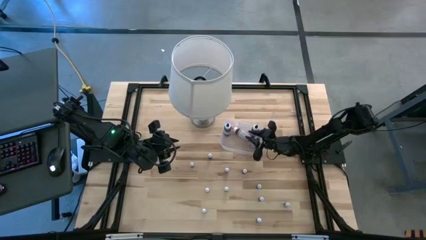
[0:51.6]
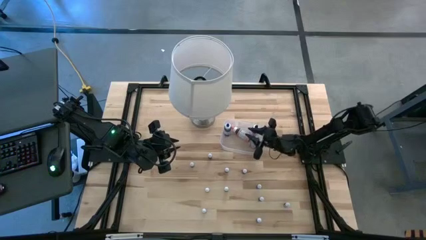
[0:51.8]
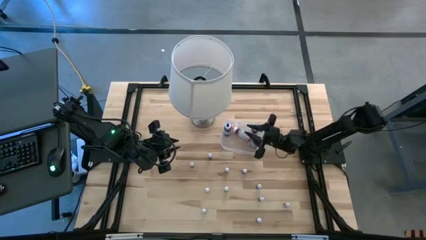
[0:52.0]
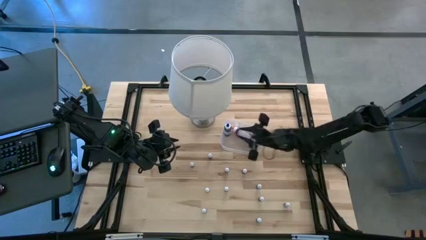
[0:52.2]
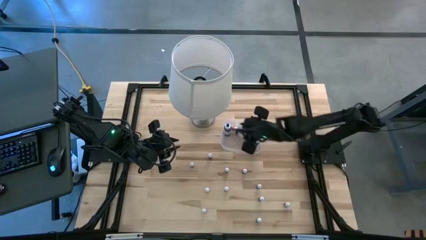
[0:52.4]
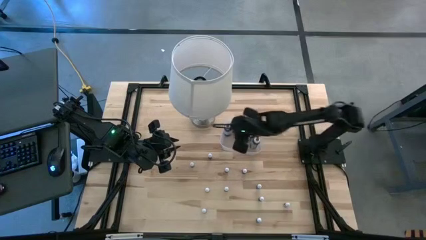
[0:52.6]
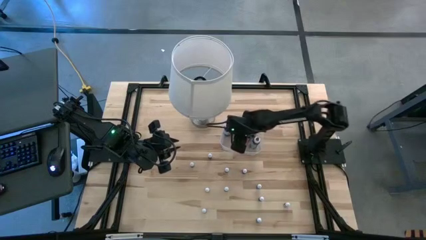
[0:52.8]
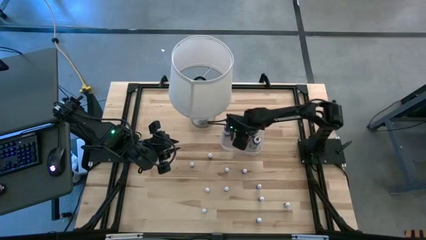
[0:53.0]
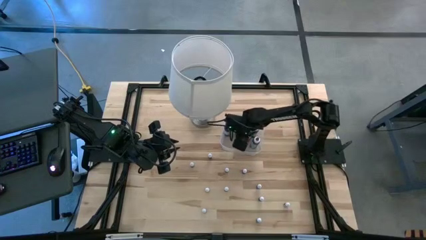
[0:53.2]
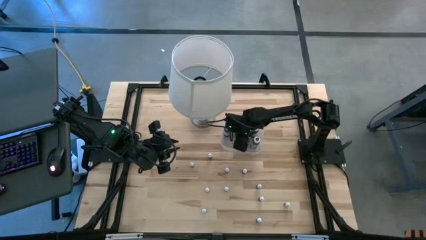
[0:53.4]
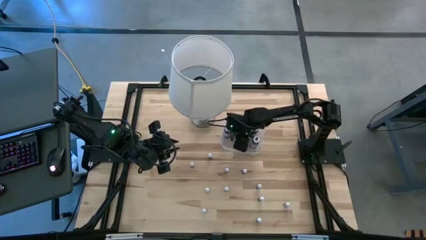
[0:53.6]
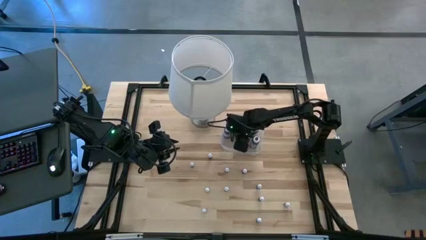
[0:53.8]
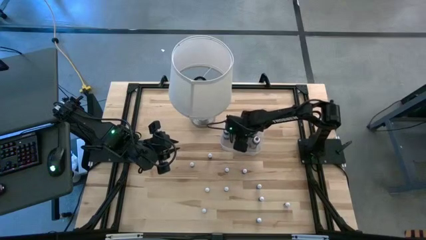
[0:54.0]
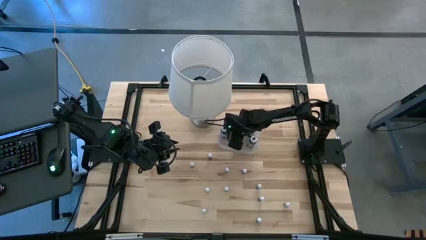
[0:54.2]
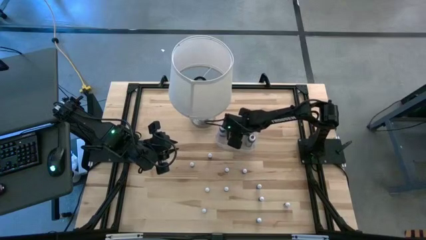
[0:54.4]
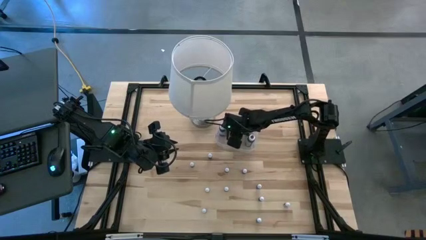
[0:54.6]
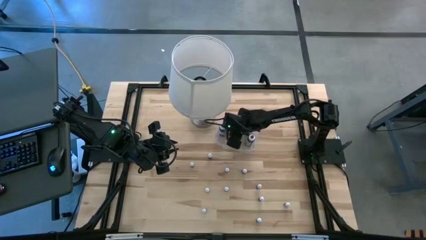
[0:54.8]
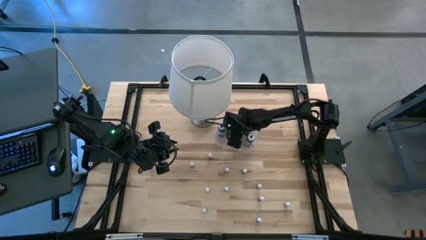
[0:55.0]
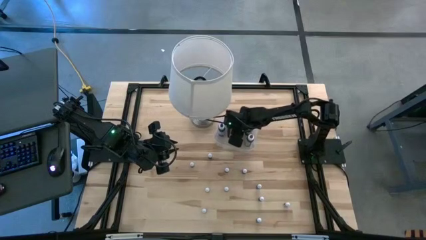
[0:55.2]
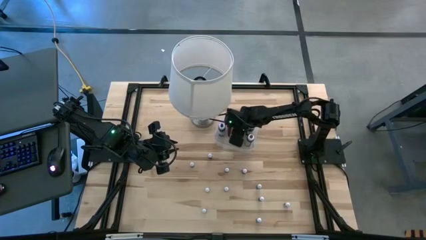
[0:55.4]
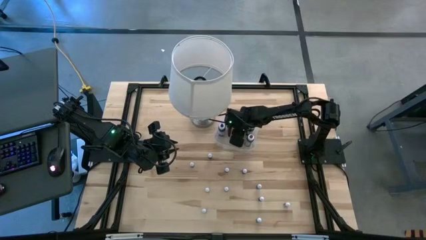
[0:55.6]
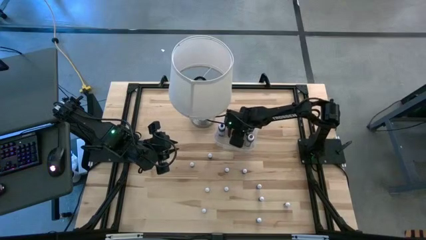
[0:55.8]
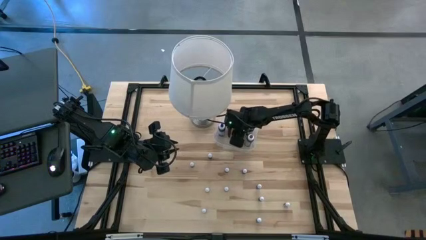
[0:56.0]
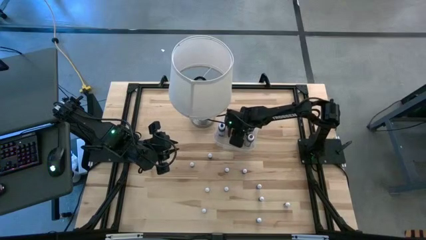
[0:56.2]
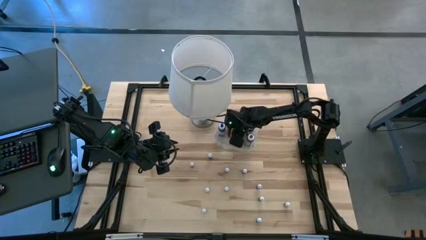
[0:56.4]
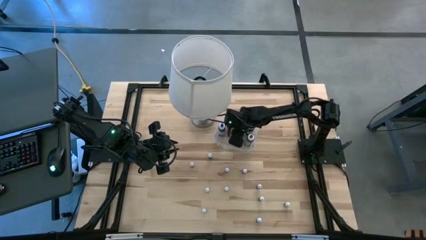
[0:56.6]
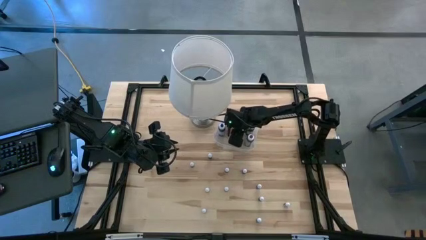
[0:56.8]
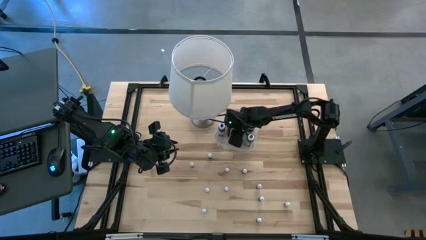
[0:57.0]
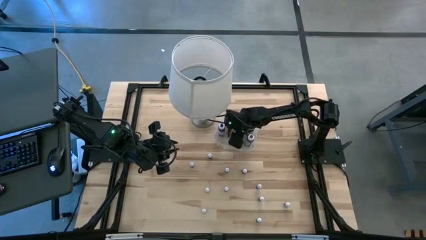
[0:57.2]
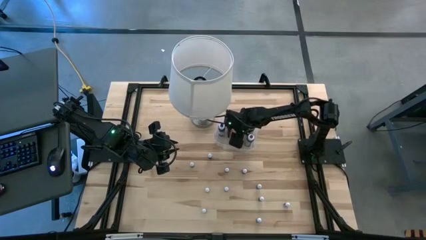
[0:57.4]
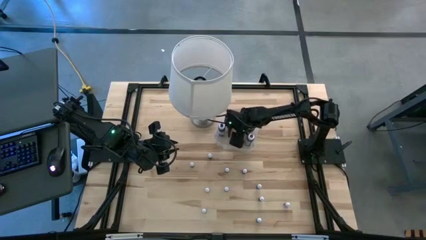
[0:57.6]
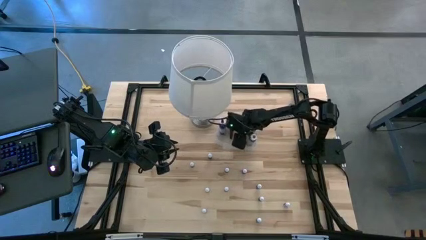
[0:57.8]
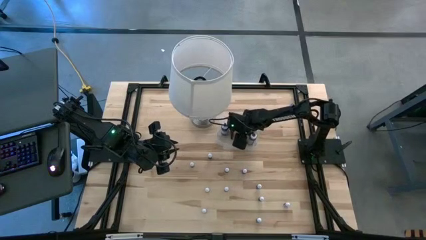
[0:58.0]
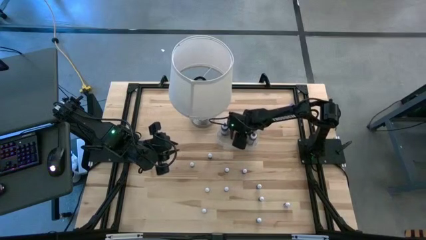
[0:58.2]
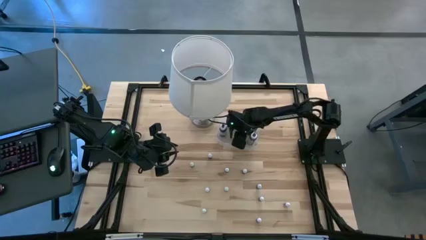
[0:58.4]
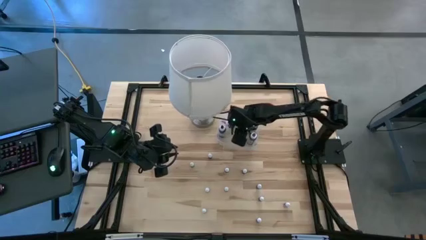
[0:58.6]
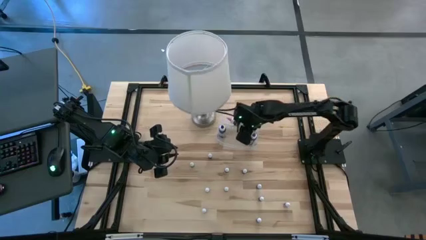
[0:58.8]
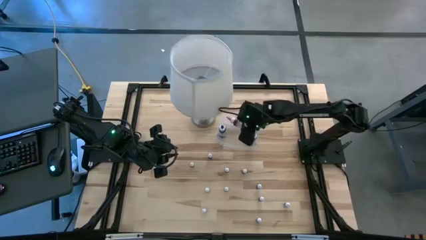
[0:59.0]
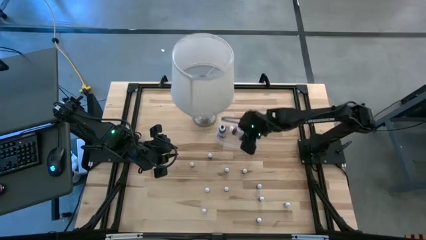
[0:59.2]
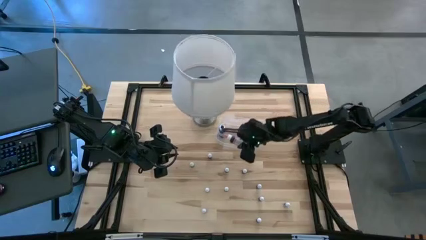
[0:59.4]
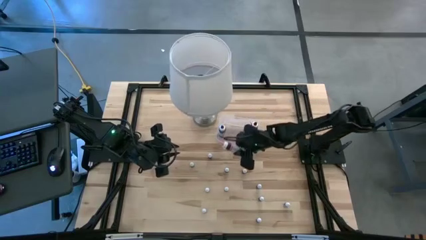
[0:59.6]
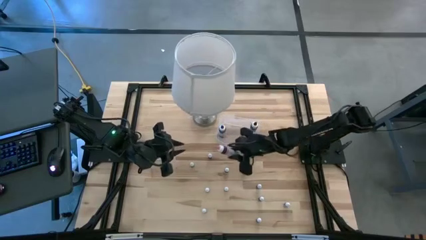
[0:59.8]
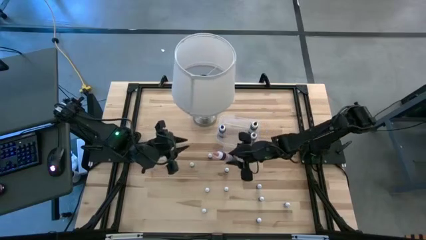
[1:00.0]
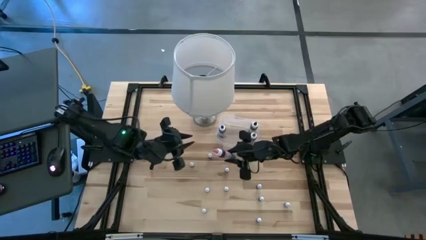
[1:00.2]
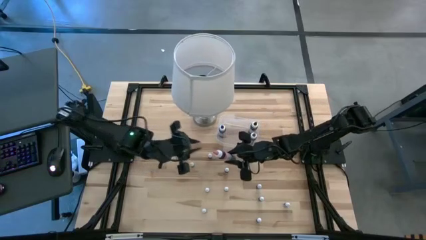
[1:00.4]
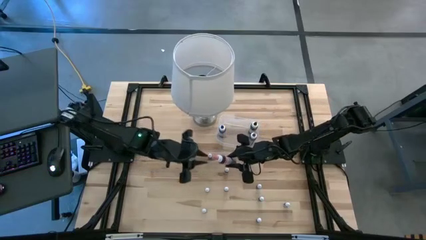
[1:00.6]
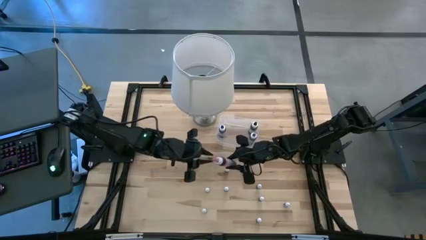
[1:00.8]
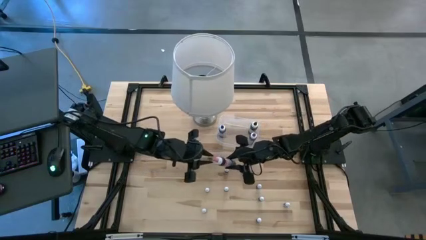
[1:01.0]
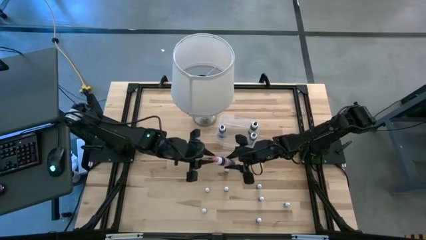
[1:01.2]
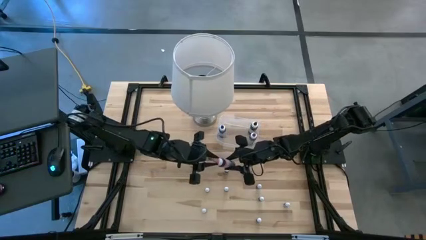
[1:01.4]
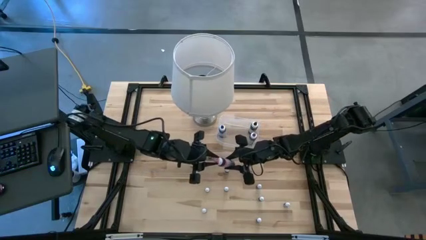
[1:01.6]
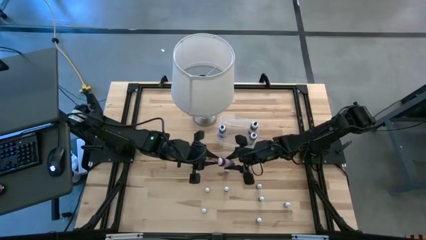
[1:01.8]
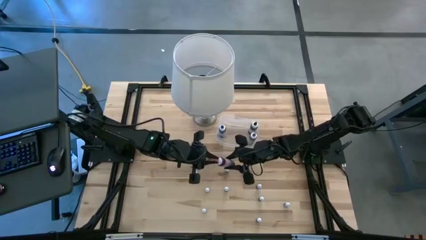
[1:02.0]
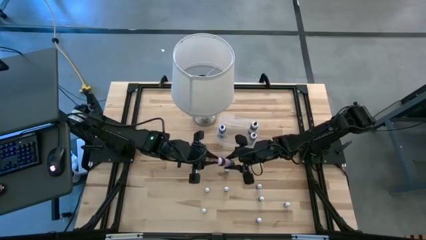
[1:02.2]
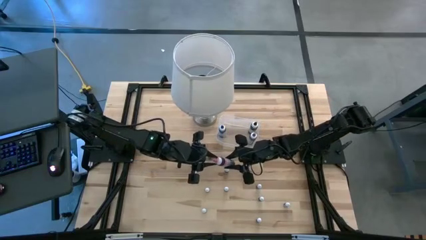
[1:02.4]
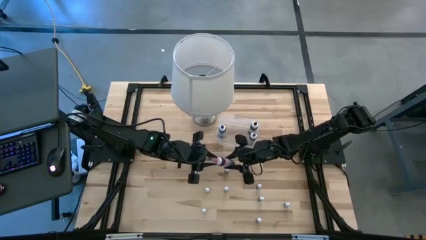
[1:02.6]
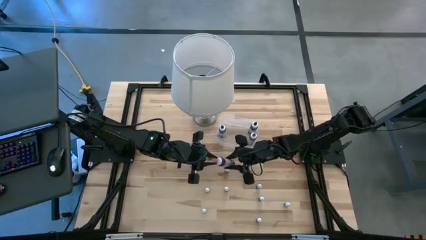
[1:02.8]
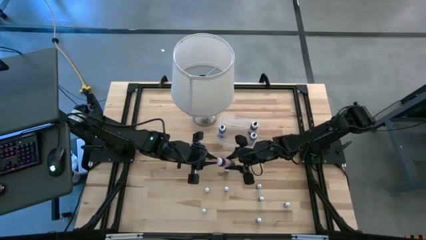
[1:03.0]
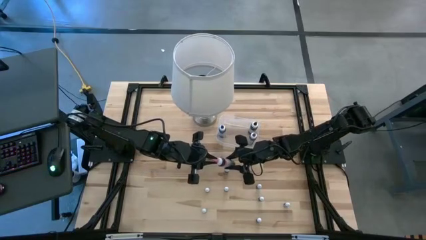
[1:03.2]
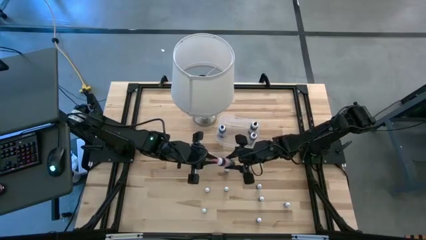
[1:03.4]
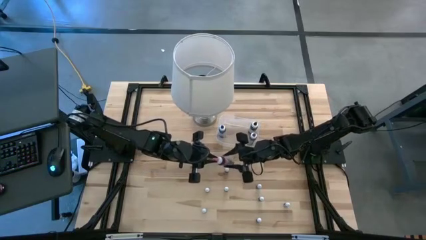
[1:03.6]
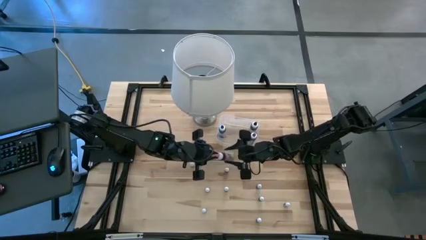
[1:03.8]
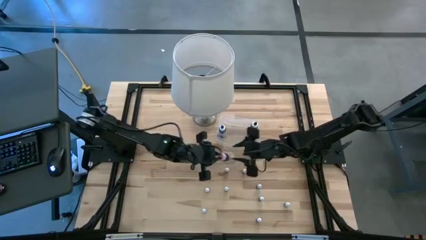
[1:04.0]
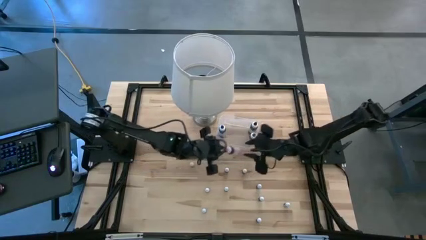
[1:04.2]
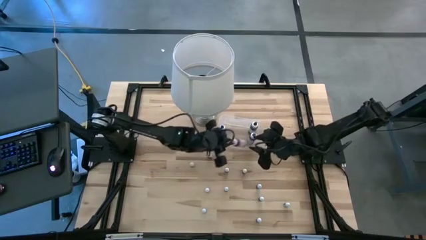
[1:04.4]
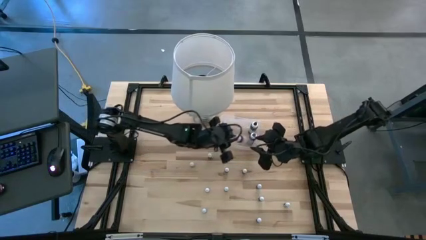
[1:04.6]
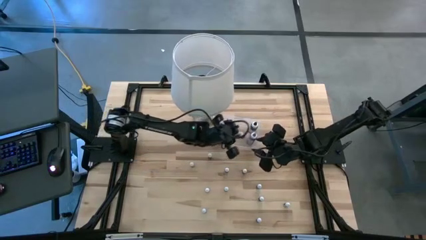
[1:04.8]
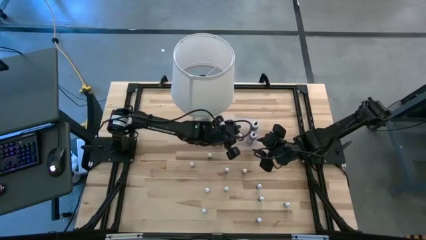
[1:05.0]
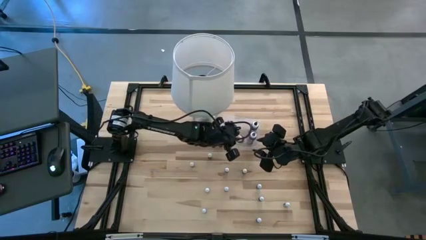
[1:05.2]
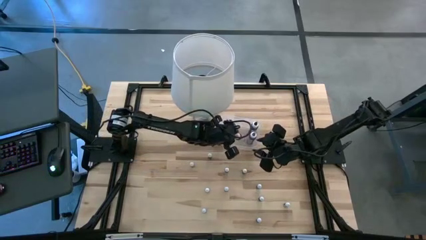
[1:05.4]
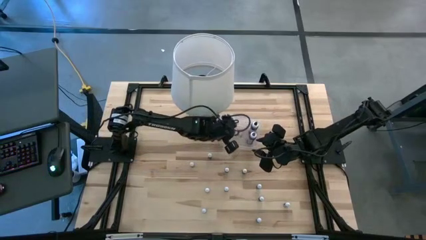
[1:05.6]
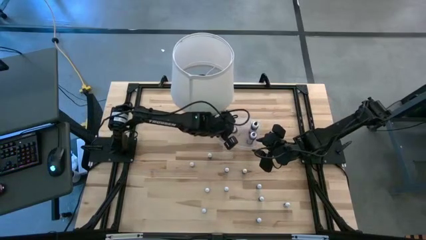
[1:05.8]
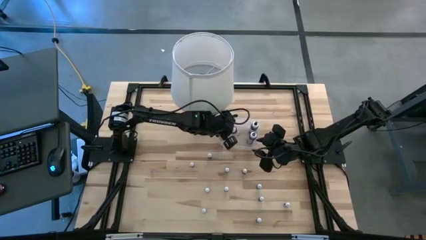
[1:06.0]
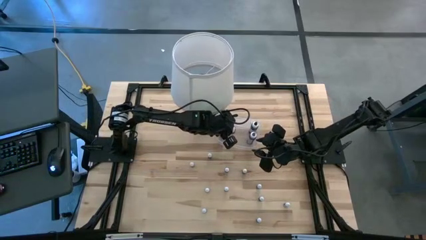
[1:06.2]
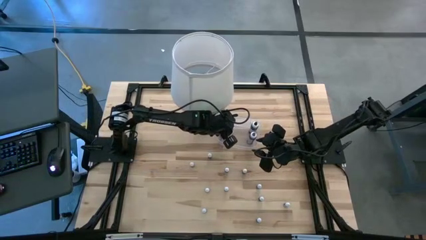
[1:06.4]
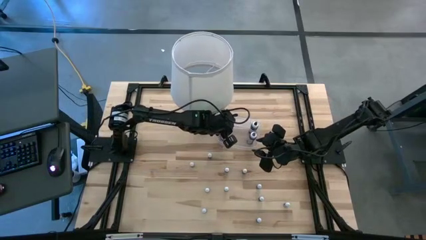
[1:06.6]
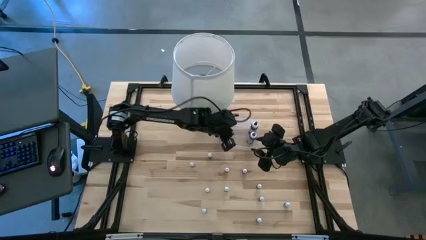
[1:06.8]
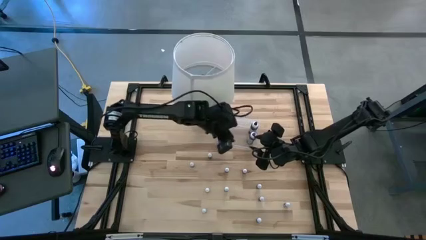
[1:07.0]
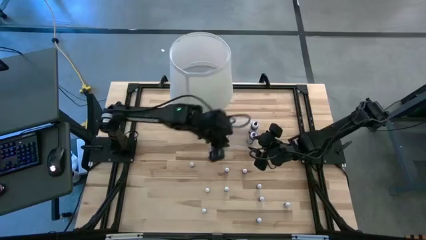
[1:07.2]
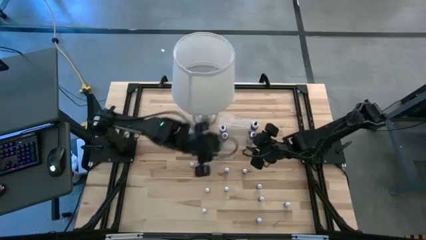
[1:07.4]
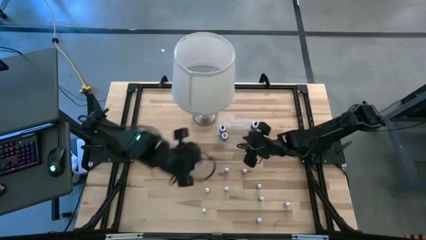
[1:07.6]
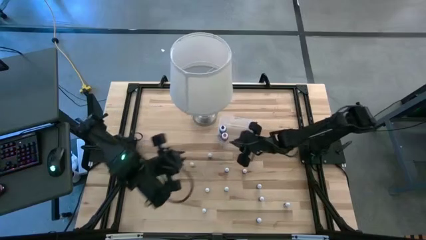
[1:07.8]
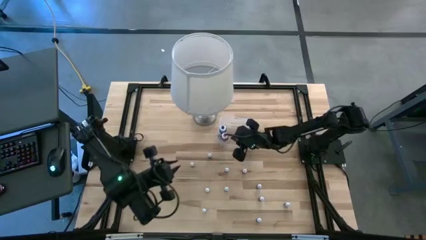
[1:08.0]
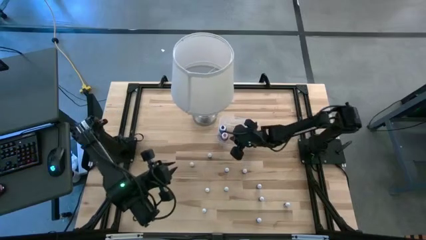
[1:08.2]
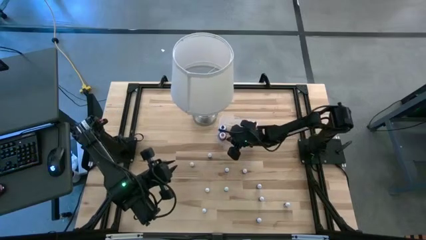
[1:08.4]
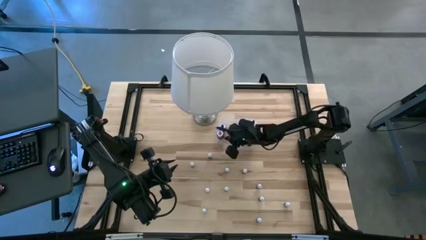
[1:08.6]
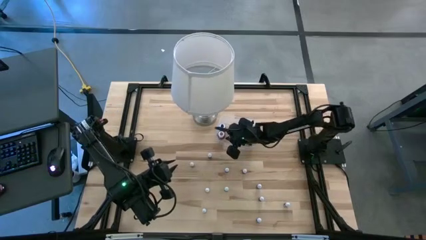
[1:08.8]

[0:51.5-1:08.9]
Task: Pick & Place food coloring
Adjust the large pink food coloring bottle on the transparent bin
